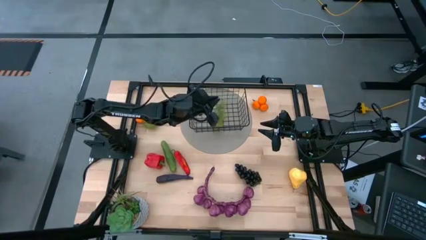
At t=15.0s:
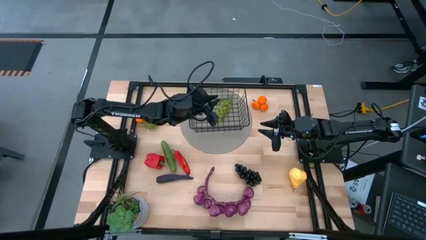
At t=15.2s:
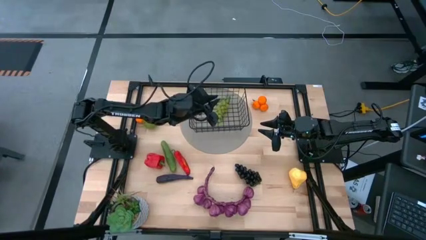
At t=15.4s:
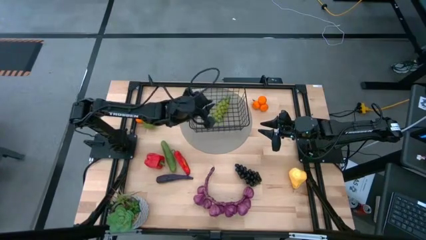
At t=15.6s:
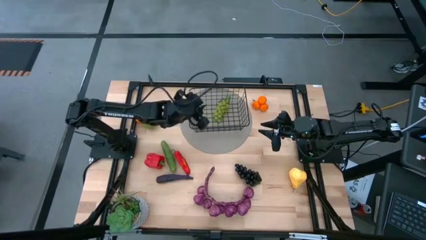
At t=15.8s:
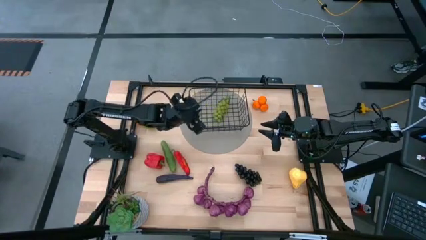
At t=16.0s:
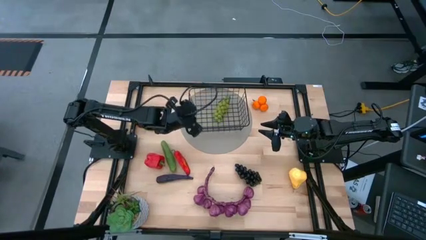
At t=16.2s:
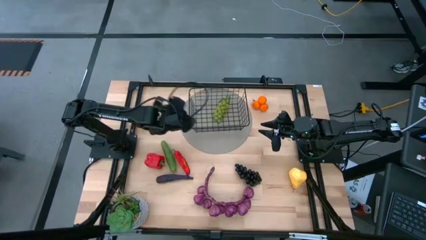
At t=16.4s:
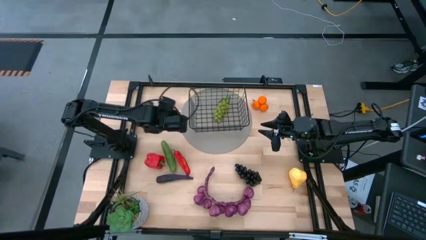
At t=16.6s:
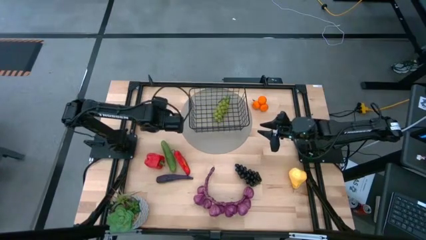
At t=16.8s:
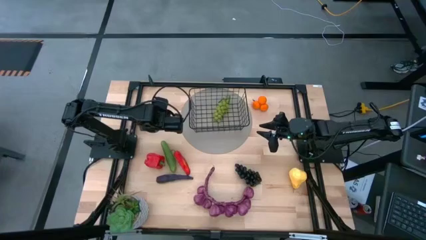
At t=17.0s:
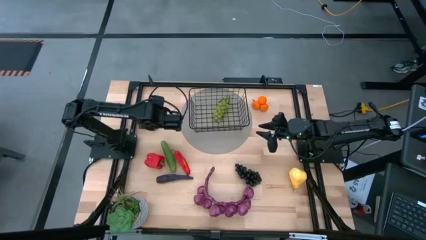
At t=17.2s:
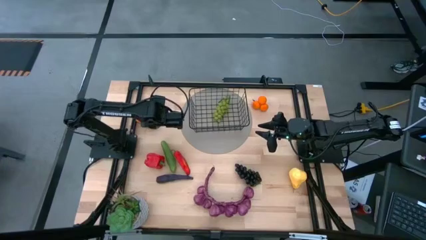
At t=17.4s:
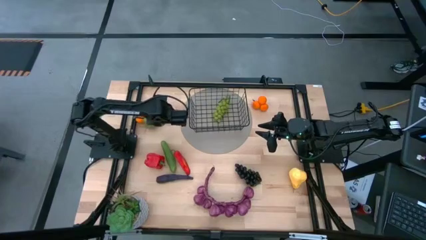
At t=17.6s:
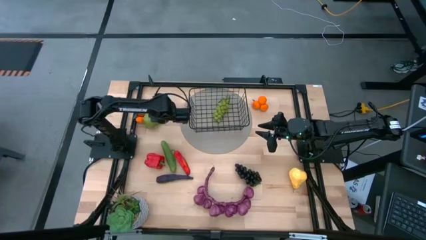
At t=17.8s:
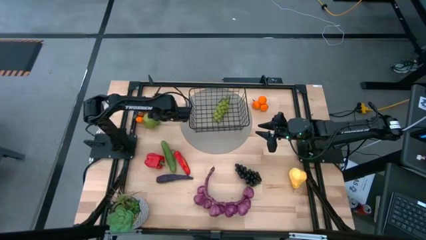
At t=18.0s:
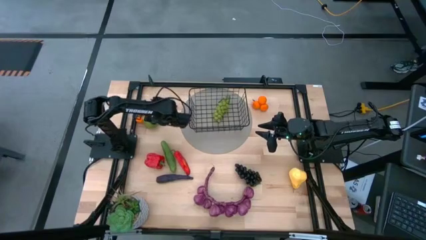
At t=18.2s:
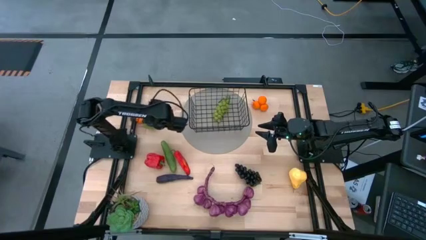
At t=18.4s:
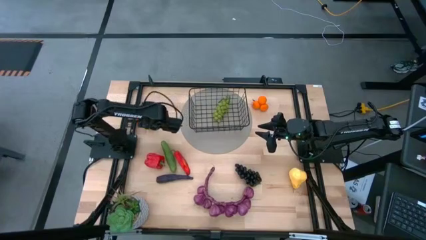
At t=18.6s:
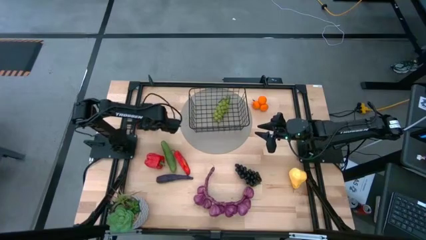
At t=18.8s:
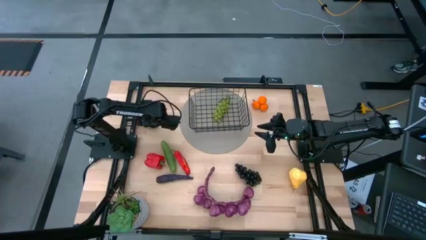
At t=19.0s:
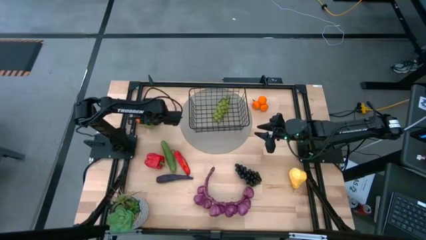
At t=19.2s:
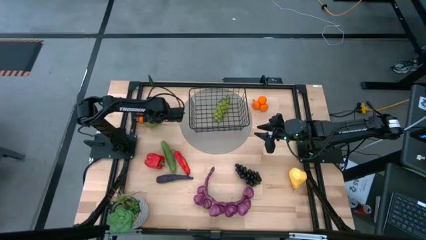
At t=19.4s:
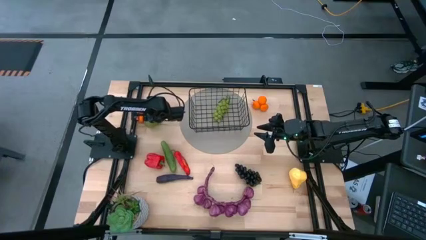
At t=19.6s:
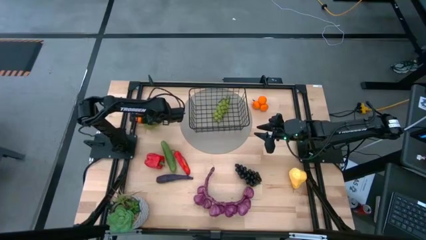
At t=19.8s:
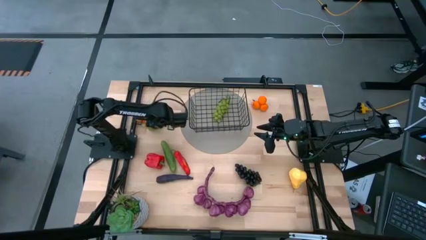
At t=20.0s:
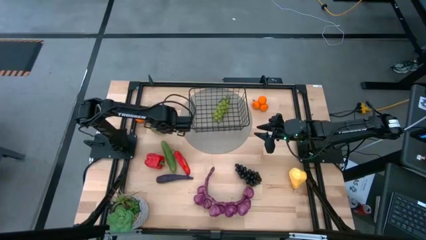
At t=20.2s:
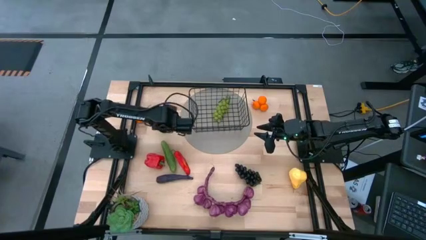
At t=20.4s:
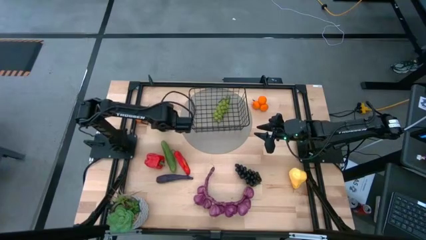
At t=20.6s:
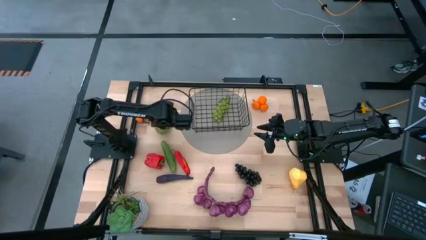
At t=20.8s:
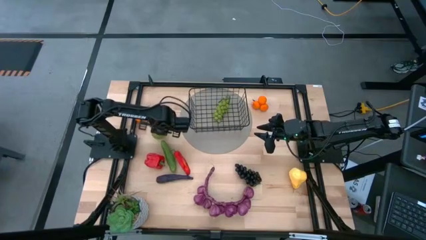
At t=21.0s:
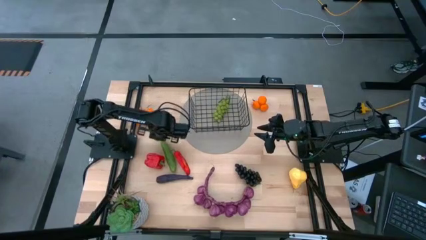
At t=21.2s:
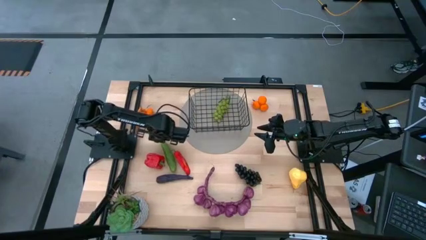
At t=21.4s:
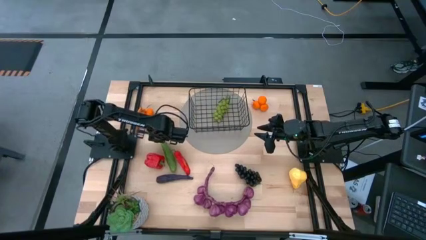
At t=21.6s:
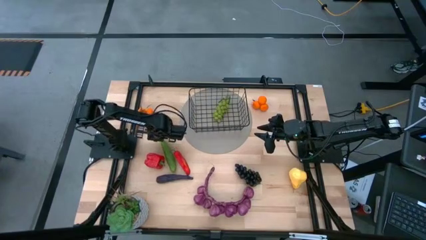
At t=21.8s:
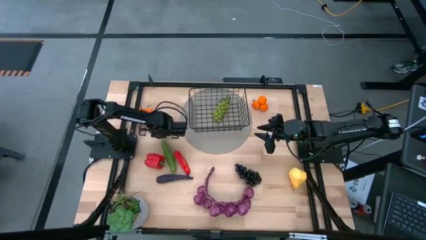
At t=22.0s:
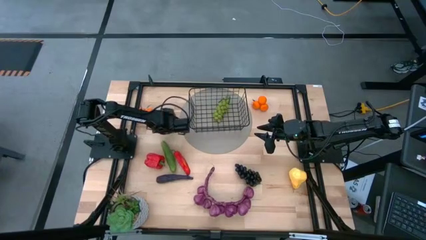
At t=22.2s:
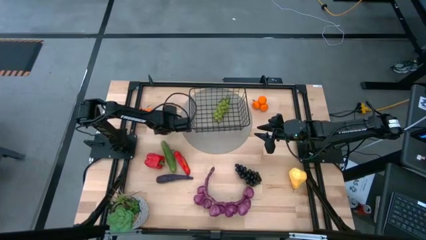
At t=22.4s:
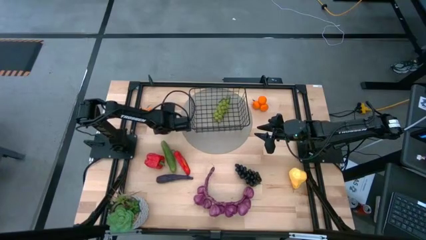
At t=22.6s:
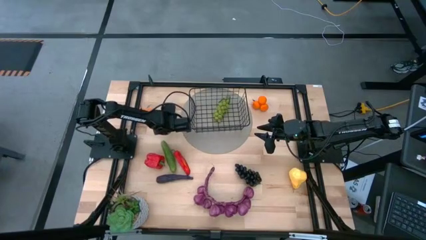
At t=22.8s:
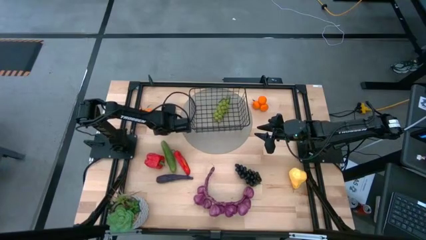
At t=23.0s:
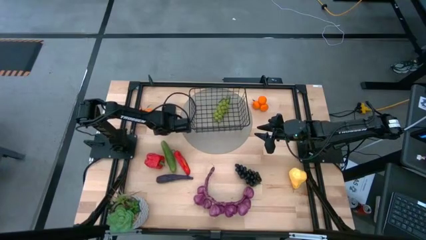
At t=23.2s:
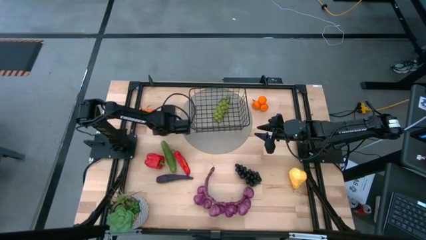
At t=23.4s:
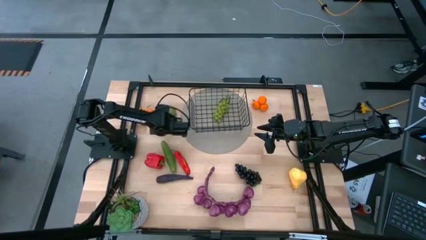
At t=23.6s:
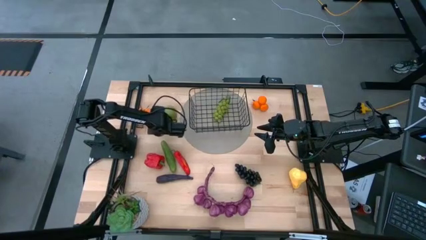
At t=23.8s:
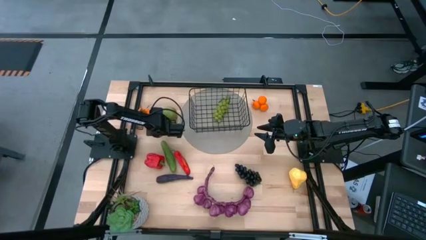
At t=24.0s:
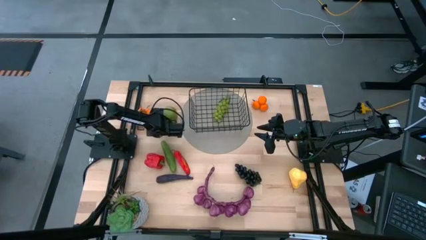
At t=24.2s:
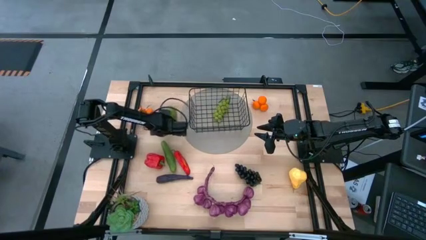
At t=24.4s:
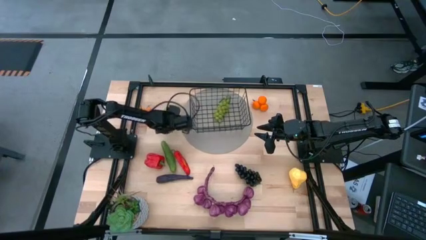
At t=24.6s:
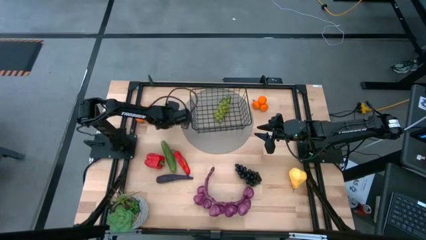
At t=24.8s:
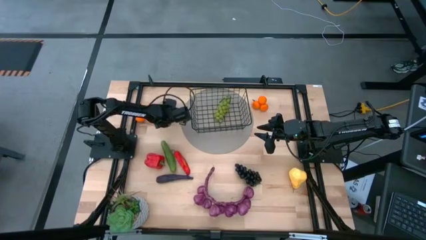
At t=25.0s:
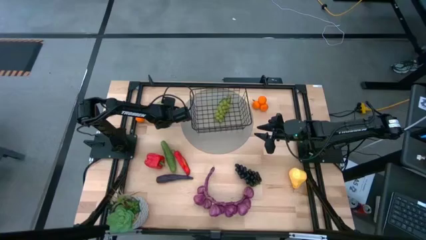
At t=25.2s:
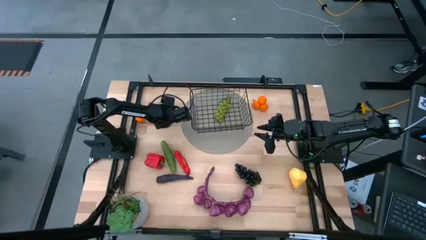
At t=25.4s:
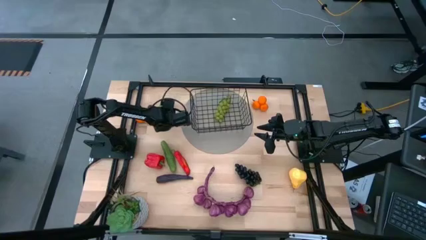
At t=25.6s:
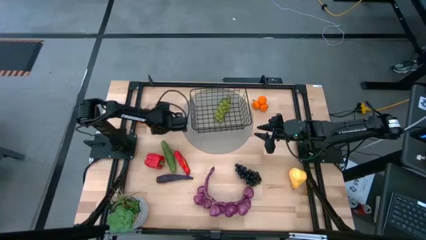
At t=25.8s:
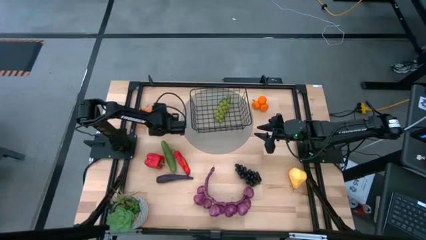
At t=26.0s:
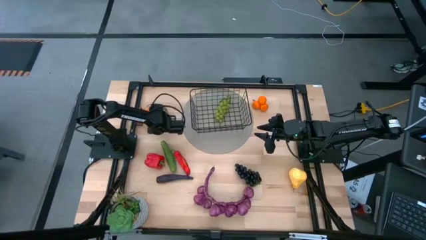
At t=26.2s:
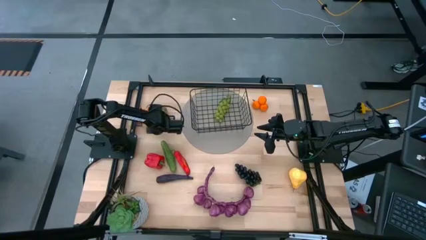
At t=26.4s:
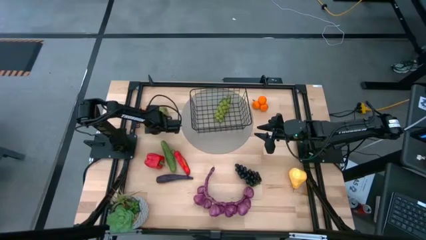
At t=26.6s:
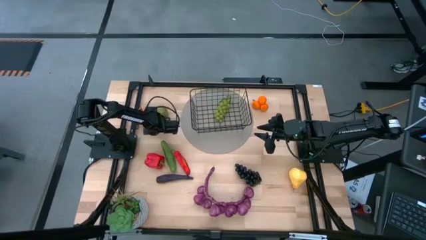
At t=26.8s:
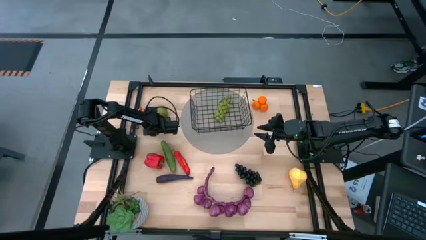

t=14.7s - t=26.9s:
Task: Build produce basket
Put the green pear into the black wire basket

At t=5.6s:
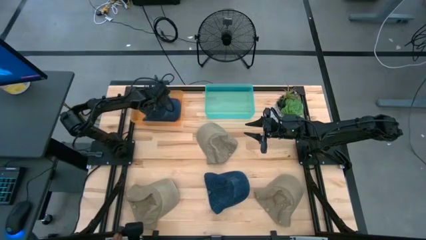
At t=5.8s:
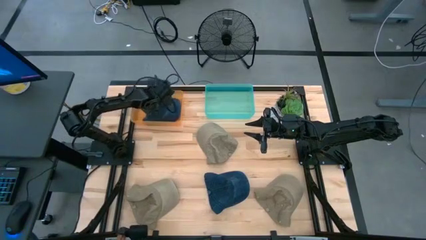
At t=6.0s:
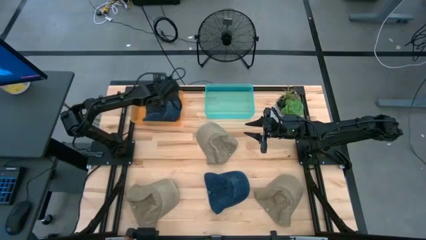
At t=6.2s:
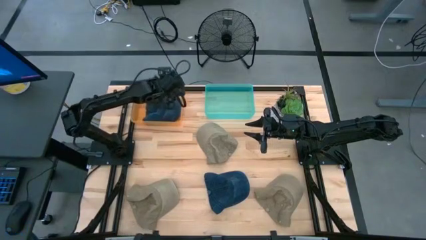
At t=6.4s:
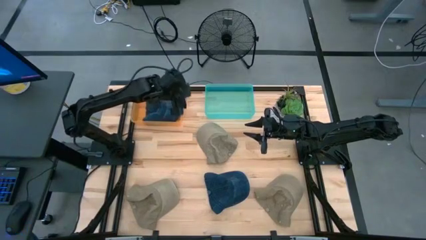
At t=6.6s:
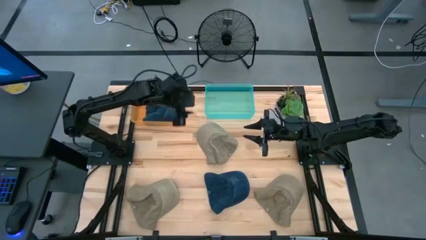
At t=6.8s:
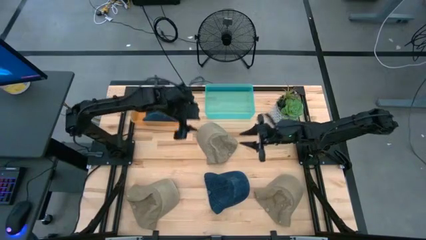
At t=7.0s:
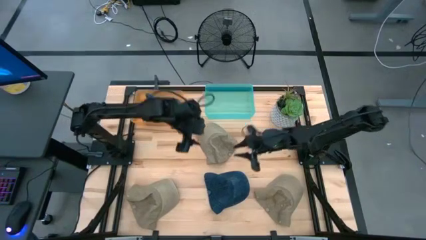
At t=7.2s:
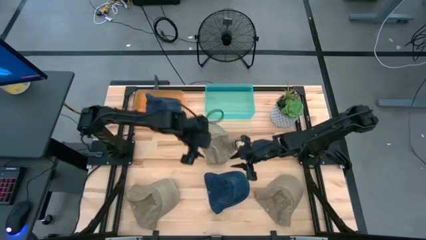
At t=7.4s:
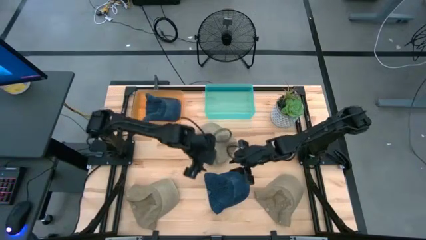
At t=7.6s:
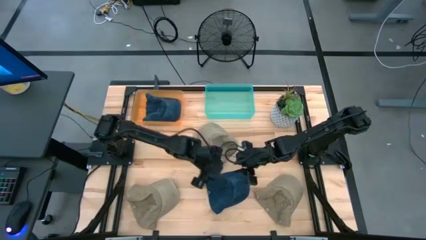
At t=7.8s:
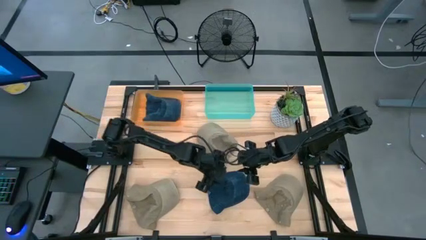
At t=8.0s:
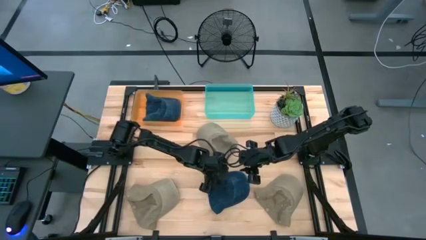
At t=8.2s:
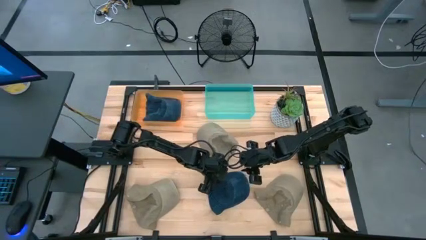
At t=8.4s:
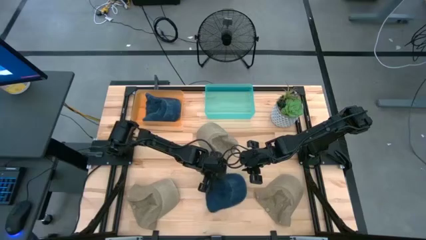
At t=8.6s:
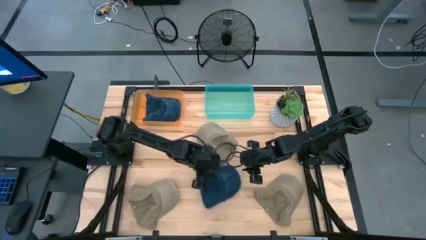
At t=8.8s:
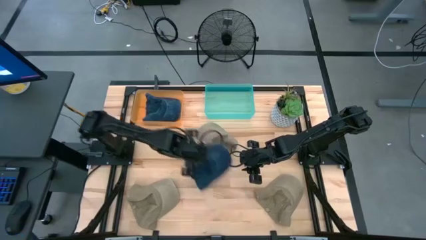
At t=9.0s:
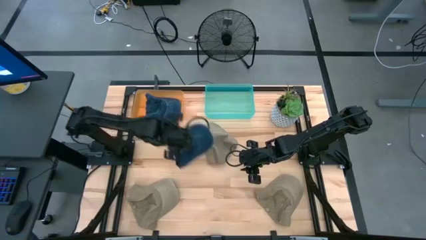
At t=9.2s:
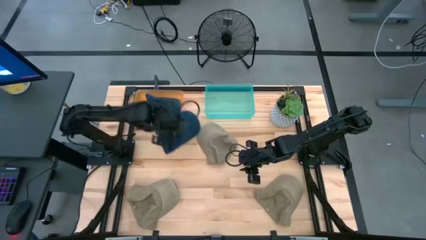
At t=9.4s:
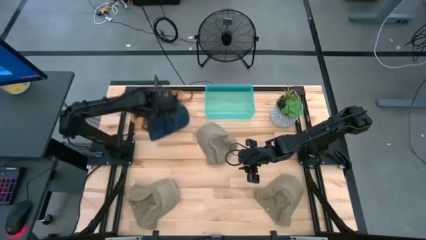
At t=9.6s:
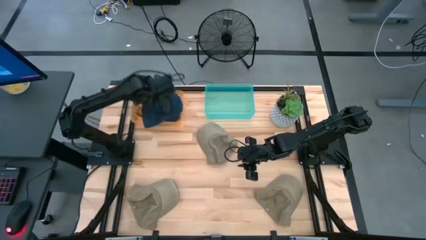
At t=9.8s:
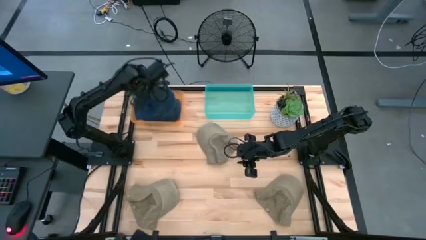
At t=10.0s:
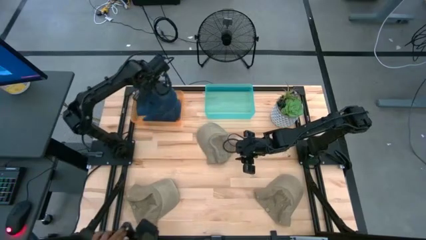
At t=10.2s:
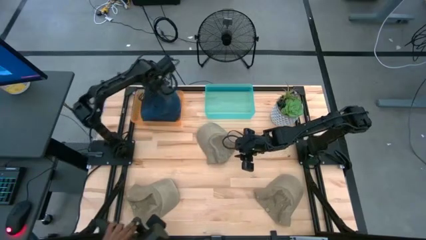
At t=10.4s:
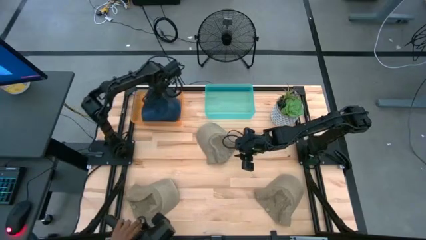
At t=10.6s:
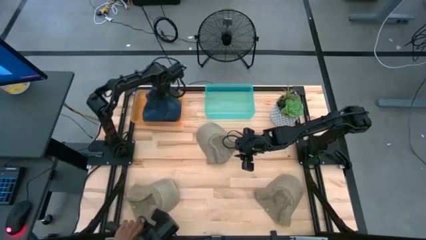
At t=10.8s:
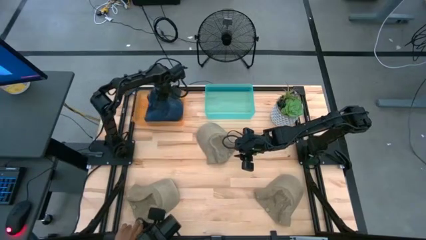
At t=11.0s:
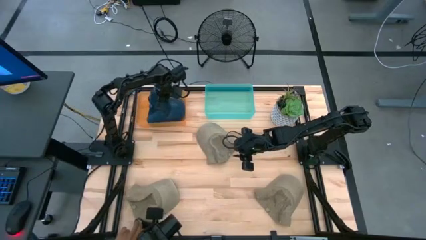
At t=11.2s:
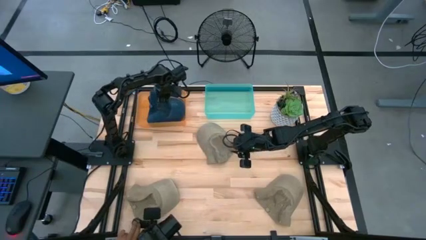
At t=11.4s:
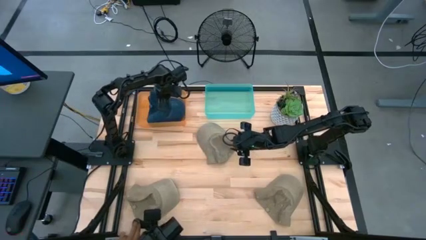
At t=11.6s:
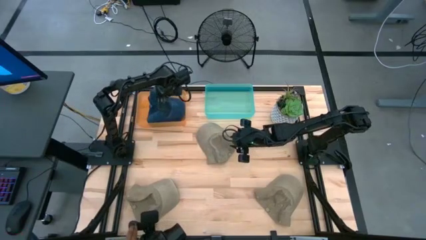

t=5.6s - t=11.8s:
Task: Pick & Place hat
Put the blue cap into the orange bin
